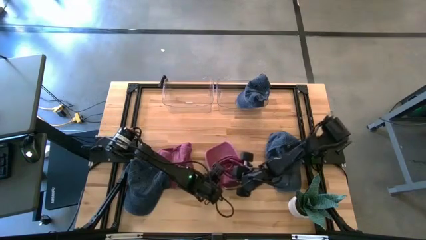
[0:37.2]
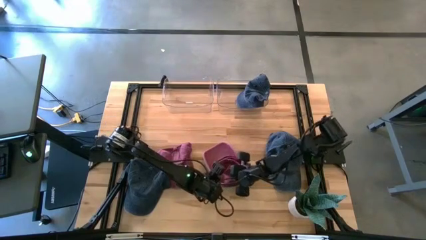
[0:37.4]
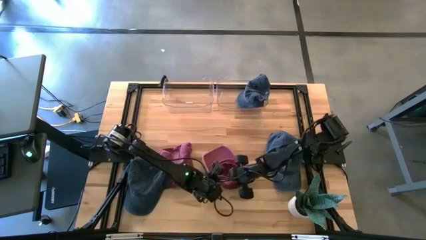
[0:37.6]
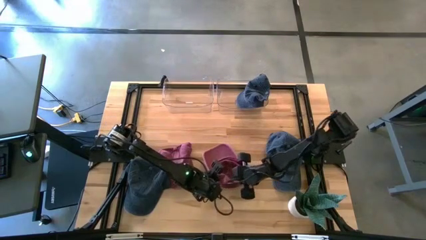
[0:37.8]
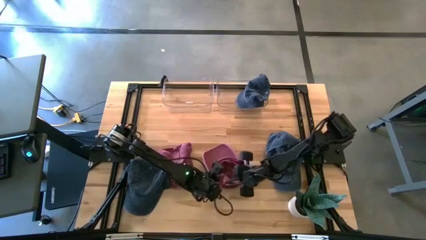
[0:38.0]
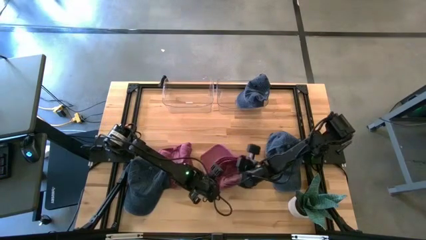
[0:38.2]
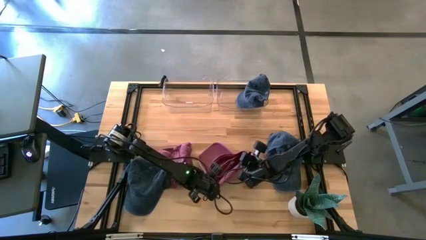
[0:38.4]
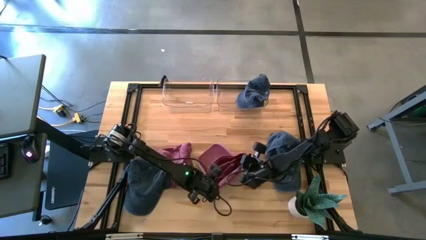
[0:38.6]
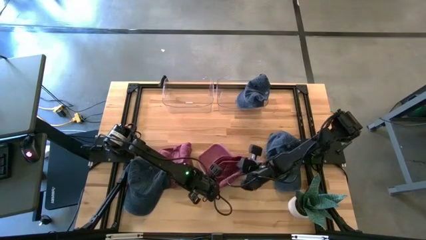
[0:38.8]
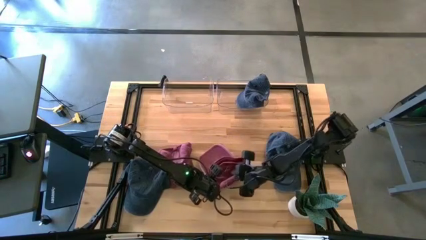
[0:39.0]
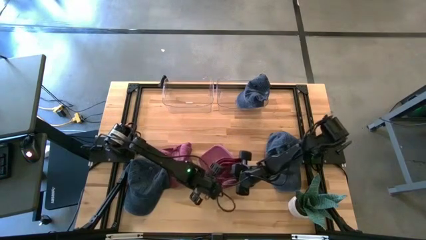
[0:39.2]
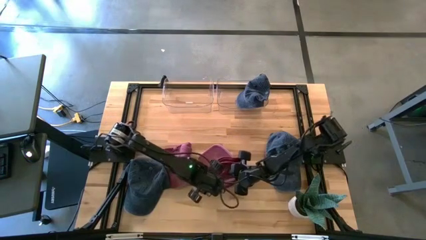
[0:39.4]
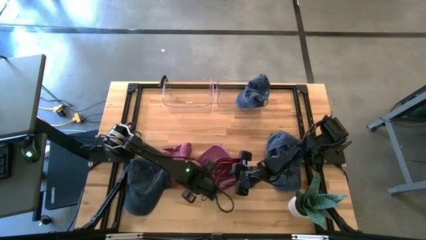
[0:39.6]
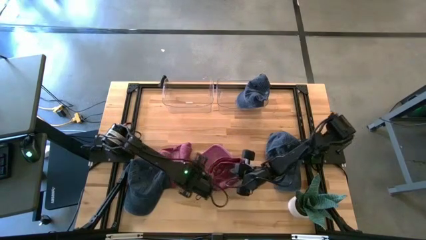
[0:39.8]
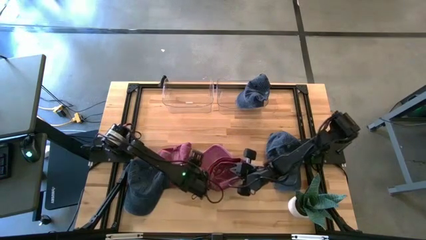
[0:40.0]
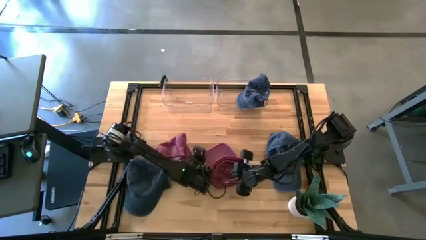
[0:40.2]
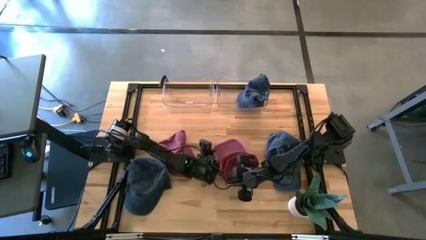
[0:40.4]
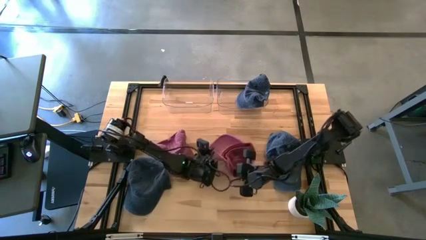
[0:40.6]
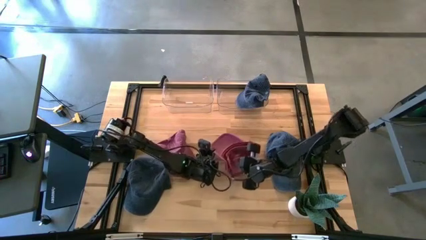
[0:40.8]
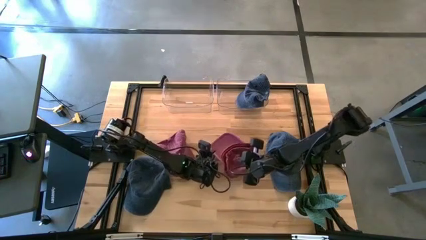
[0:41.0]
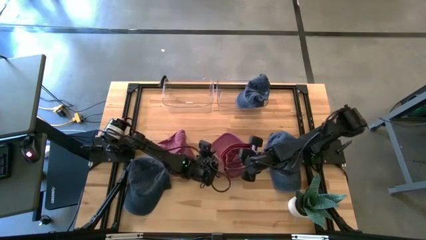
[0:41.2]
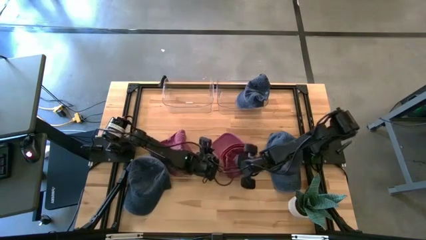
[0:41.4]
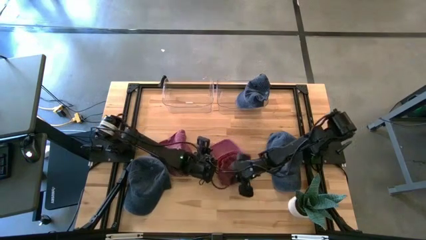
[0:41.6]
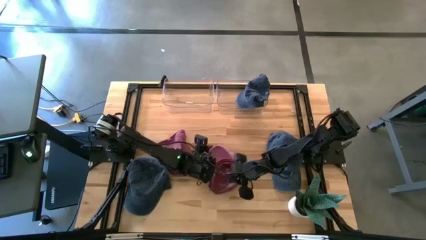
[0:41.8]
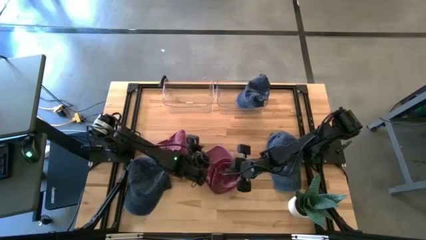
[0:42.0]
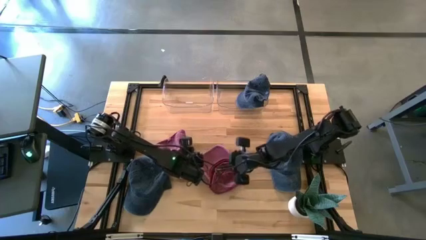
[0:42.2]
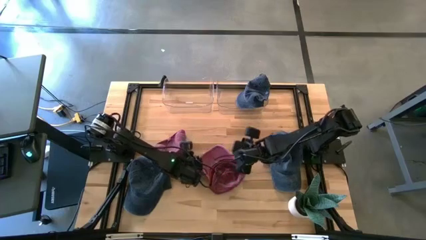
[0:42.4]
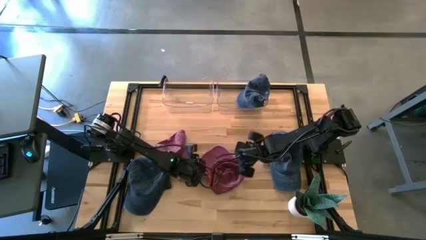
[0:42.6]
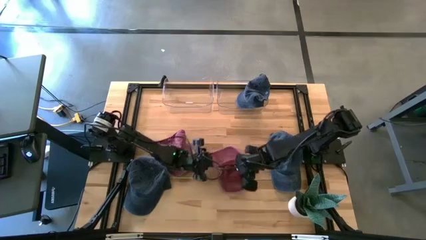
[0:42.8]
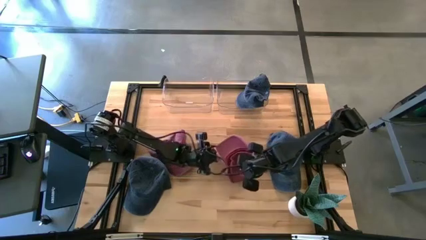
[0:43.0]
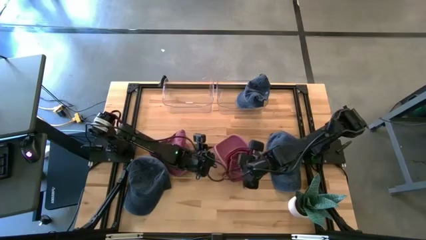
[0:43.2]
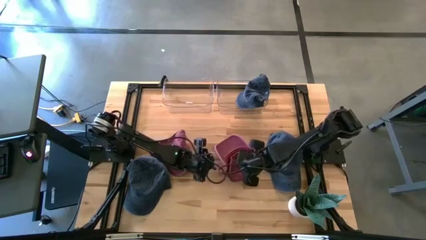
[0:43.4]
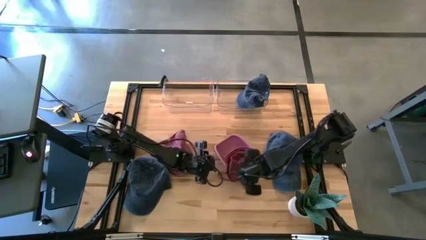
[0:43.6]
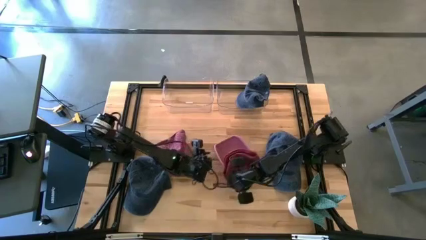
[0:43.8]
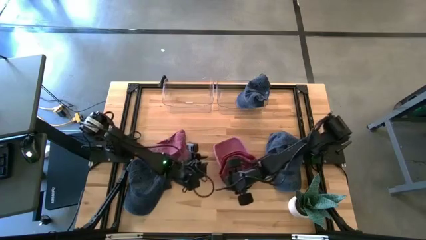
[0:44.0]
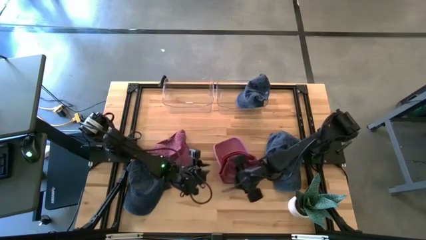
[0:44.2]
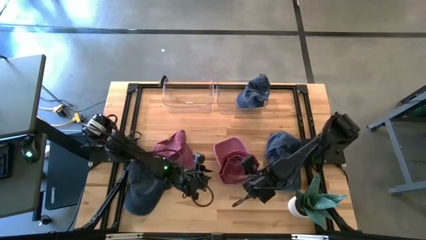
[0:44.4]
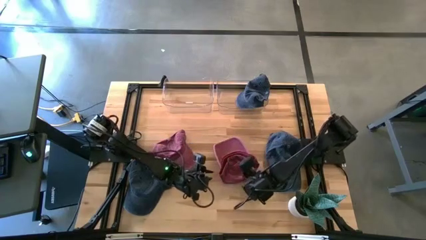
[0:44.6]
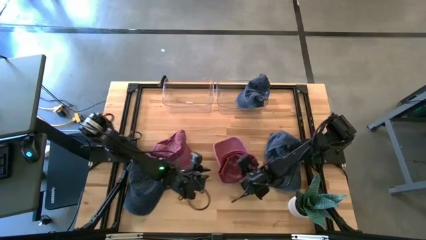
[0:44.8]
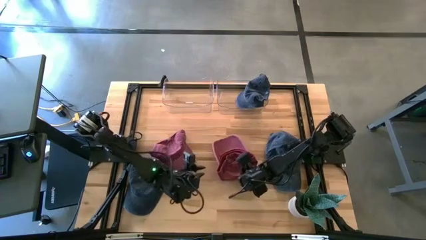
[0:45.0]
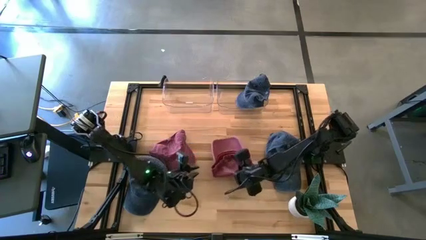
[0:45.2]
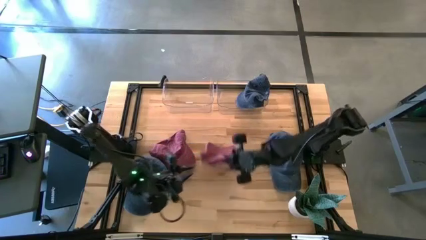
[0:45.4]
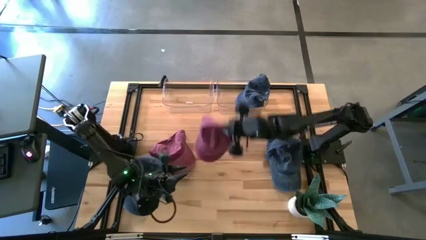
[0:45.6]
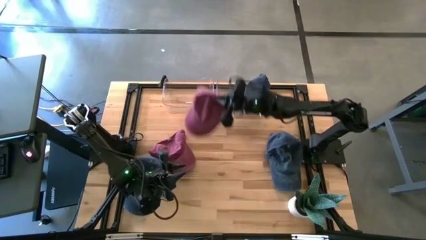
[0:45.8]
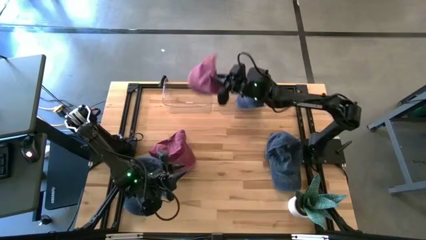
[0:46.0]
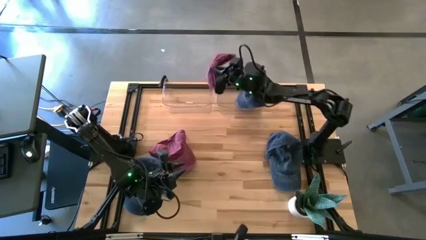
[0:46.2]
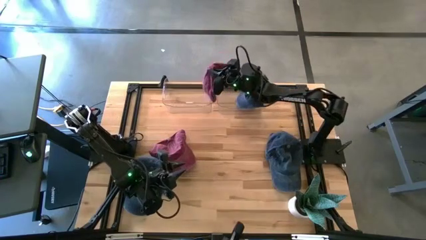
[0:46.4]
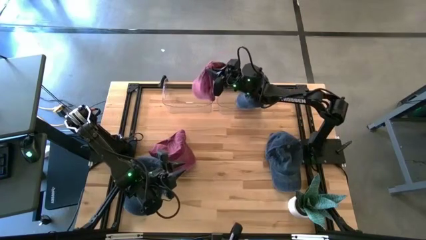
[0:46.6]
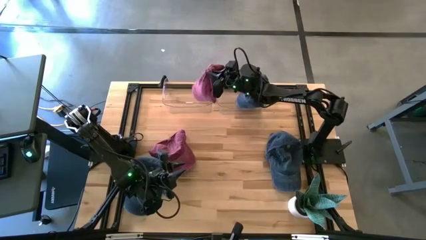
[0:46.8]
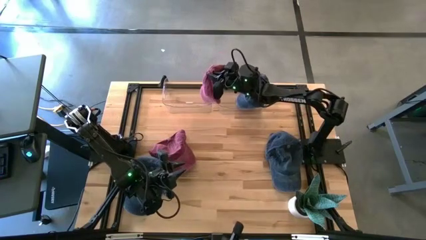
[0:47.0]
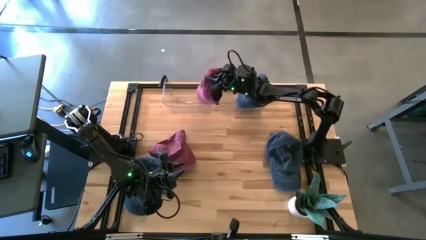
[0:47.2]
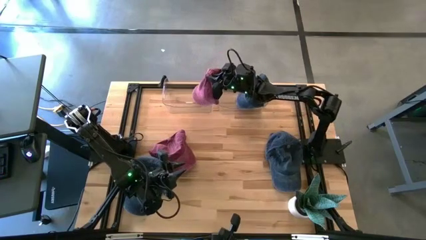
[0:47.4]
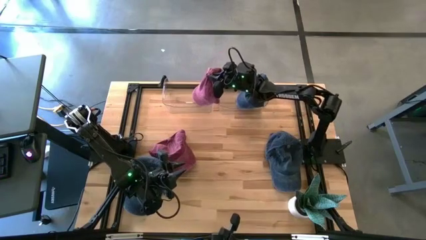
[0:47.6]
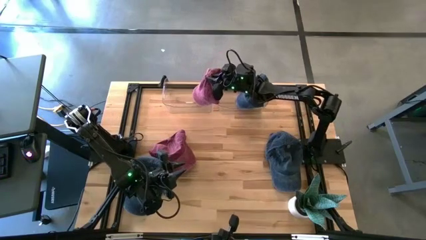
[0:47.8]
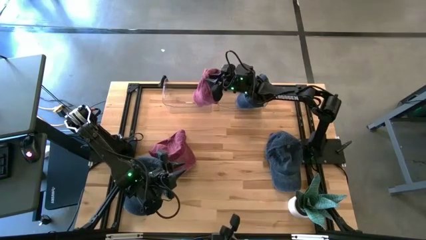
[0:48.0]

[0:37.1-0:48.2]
Task: Pick & Place hat
Put the right red cap into the left transparent bin

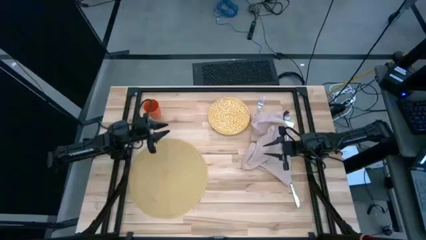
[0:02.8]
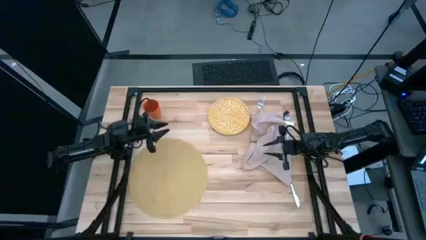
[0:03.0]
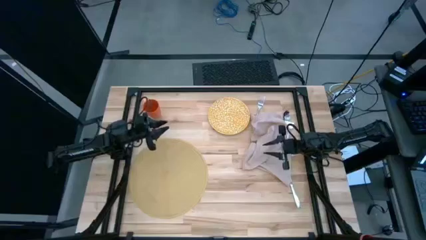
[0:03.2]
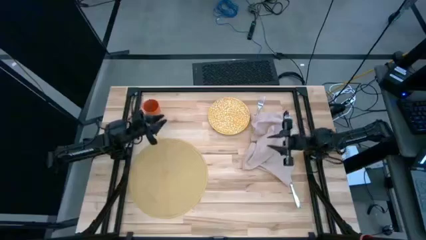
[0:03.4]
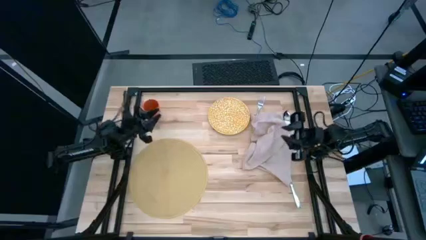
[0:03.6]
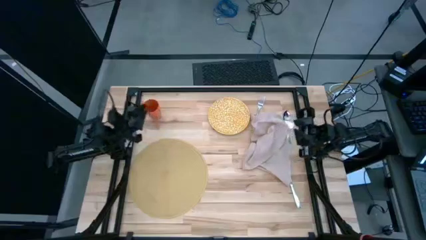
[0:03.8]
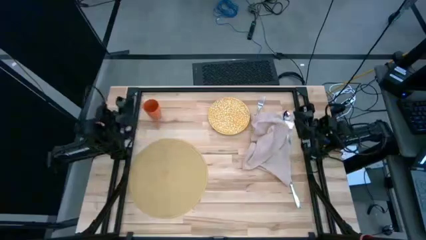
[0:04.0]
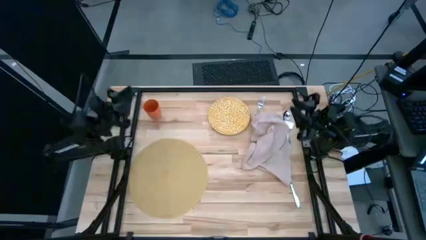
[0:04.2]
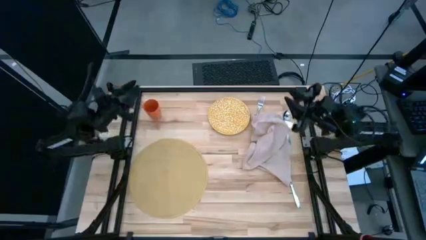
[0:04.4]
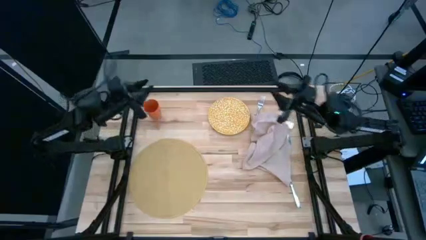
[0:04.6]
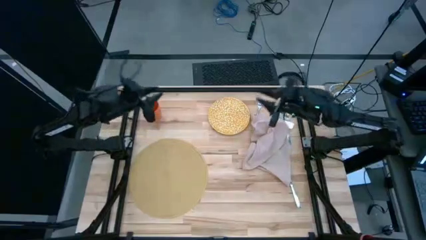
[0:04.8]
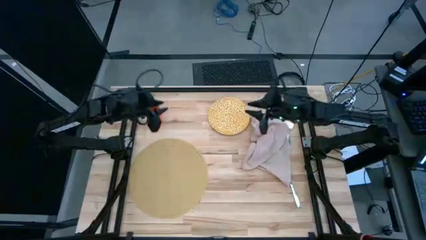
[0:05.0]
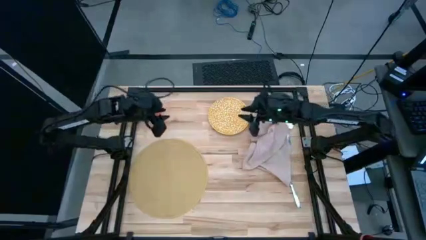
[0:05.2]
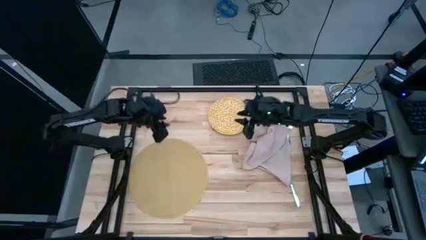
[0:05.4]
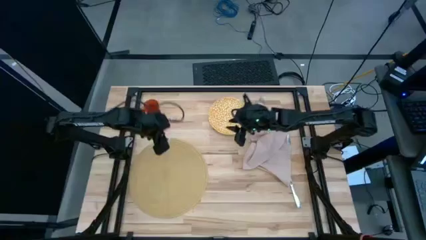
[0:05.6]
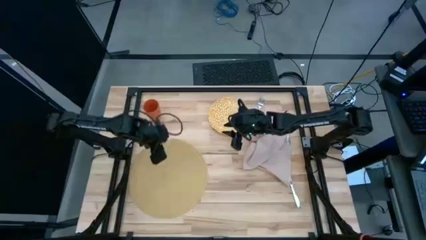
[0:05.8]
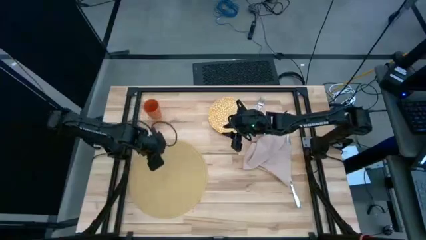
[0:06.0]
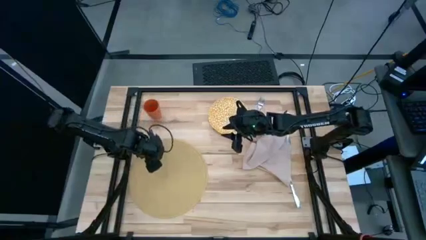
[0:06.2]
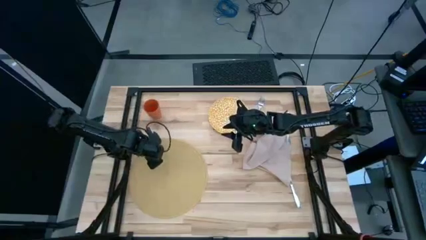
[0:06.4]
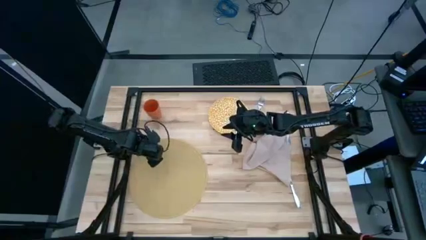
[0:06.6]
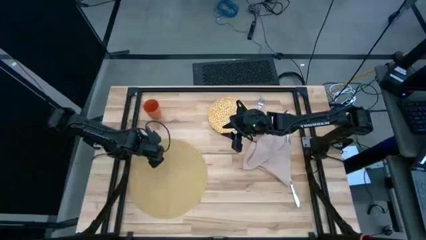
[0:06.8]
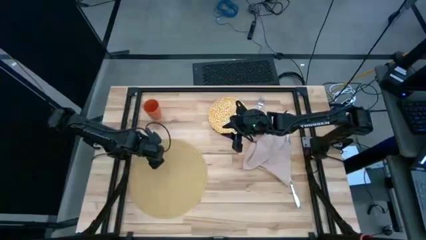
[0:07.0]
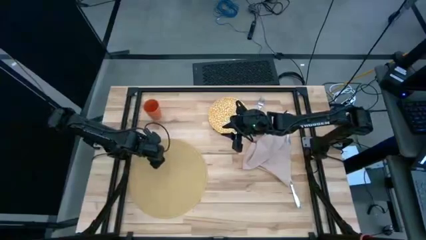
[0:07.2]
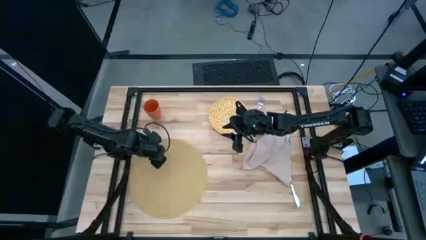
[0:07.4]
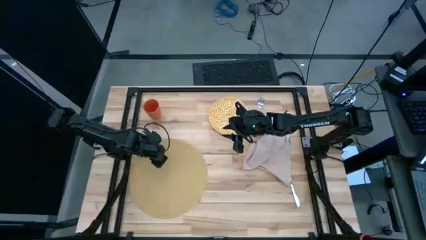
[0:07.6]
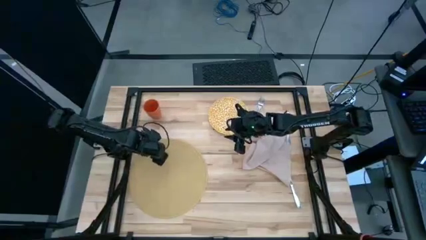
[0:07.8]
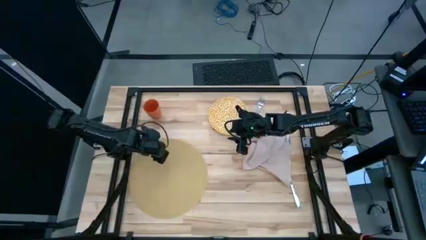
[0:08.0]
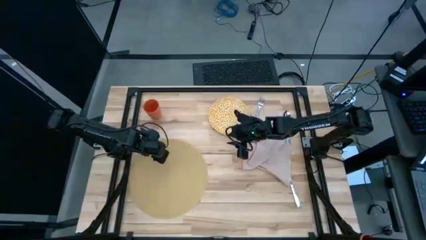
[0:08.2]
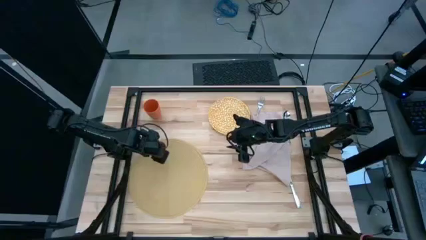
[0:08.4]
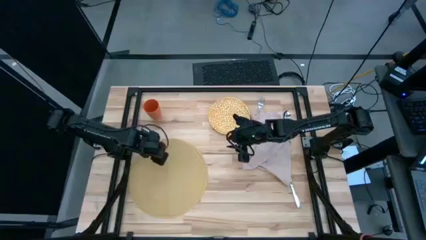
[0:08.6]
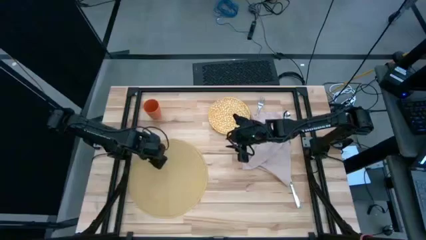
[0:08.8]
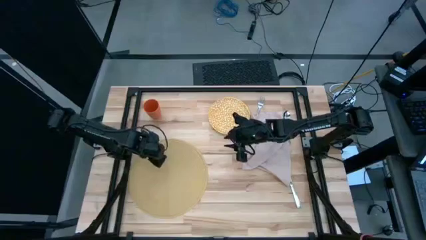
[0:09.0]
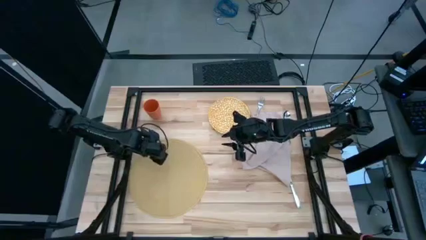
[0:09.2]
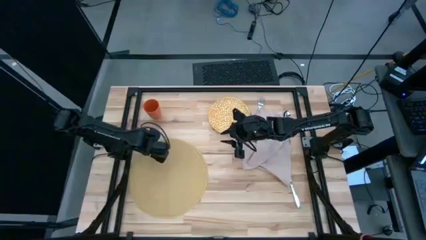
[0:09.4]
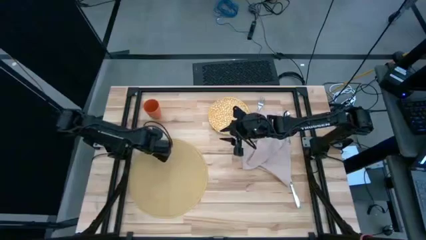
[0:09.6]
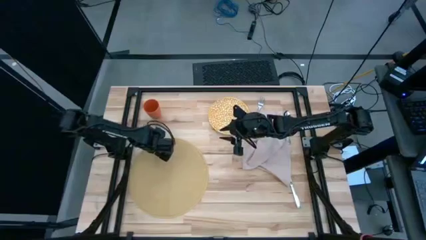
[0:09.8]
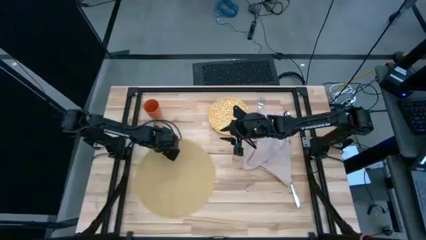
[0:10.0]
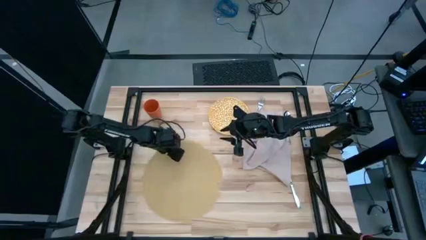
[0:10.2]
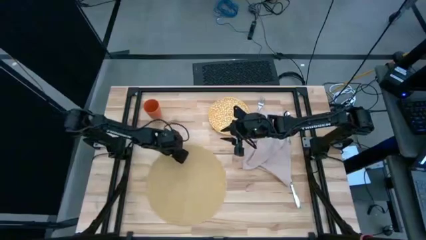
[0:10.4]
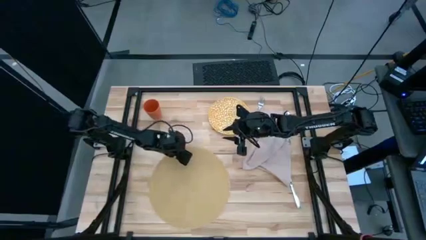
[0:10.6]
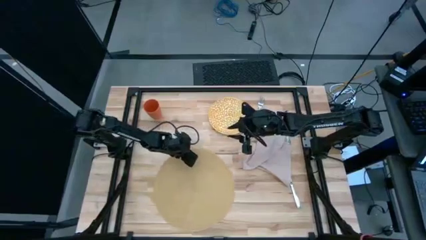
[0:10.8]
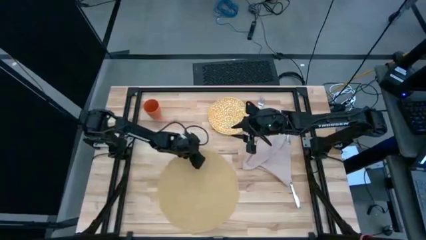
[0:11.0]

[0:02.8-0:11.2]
Task: Set table place
Move the light brown mat to the center of the table
